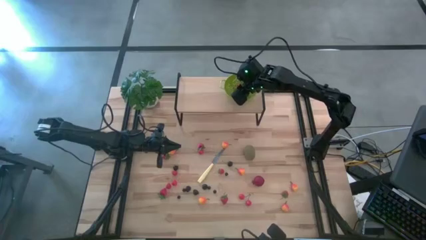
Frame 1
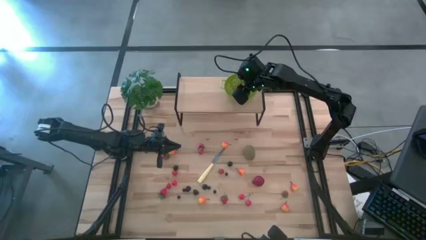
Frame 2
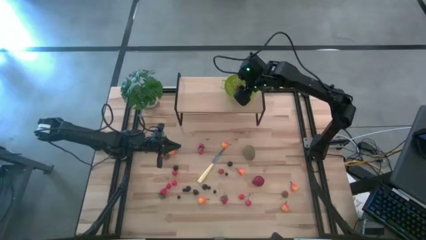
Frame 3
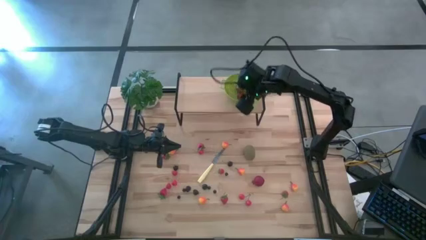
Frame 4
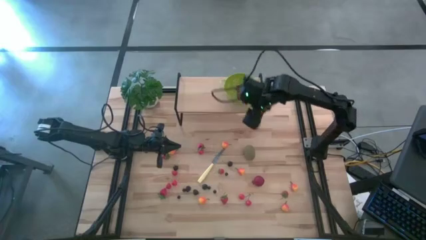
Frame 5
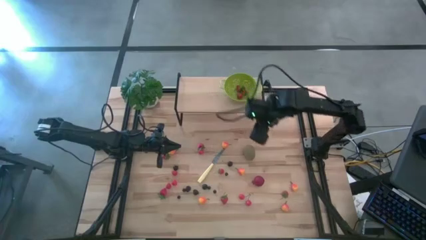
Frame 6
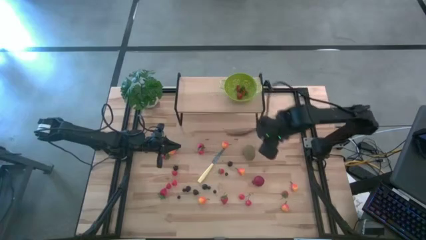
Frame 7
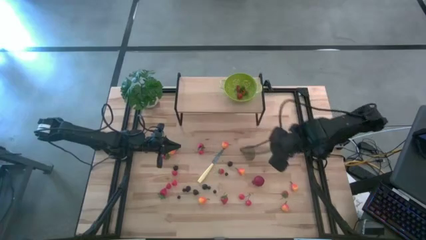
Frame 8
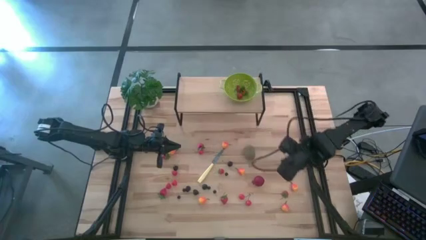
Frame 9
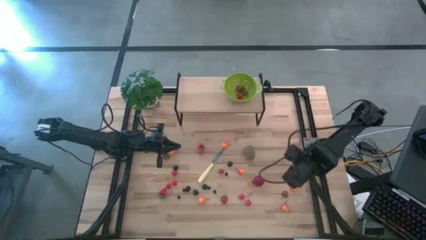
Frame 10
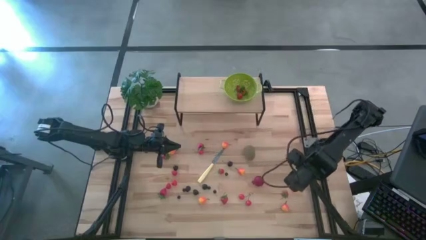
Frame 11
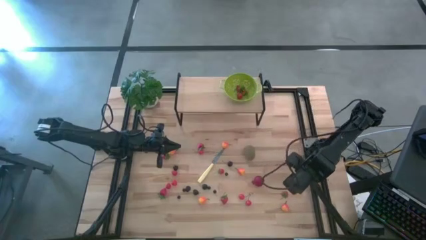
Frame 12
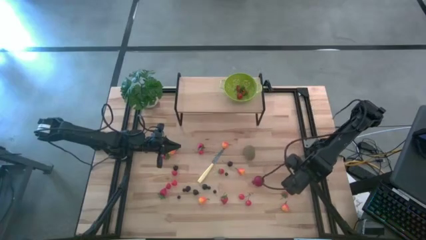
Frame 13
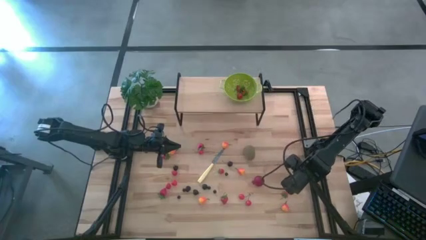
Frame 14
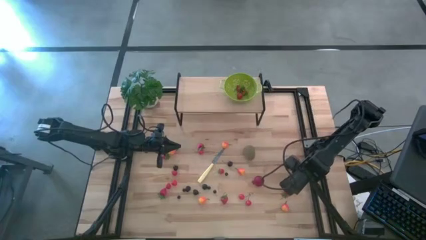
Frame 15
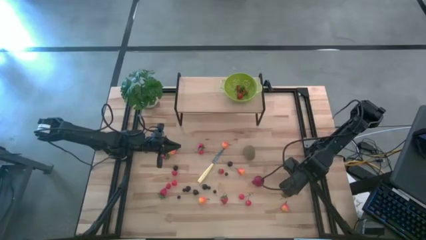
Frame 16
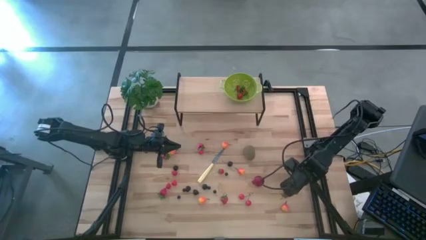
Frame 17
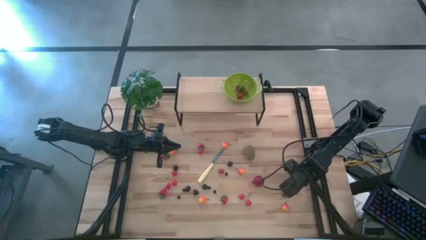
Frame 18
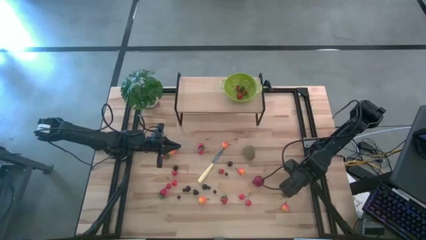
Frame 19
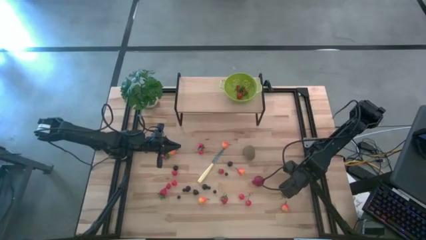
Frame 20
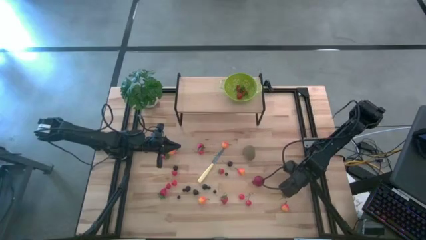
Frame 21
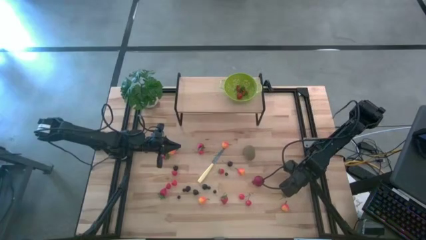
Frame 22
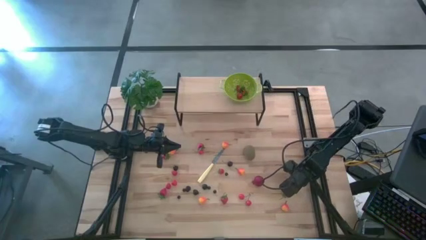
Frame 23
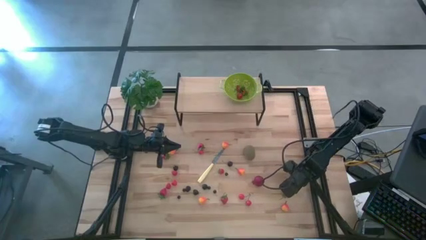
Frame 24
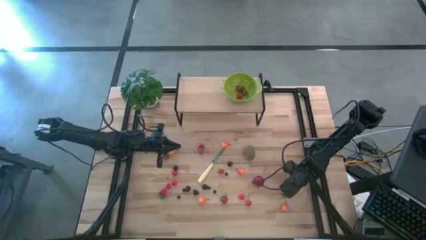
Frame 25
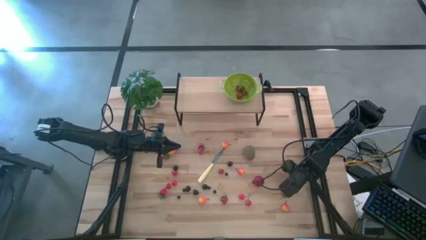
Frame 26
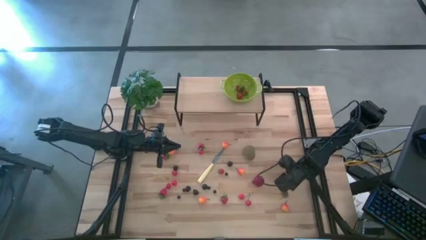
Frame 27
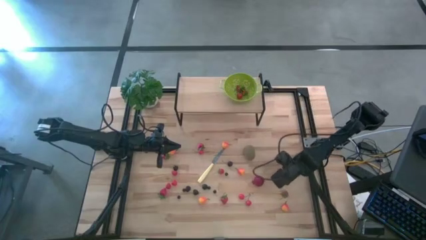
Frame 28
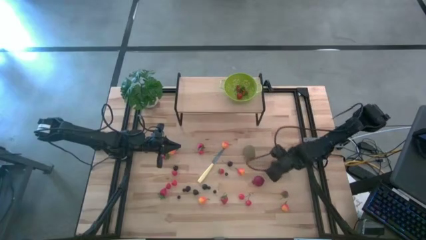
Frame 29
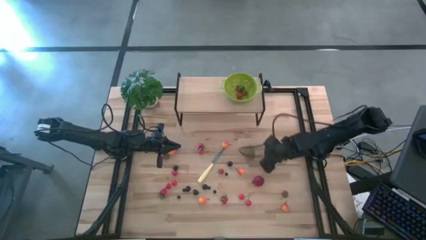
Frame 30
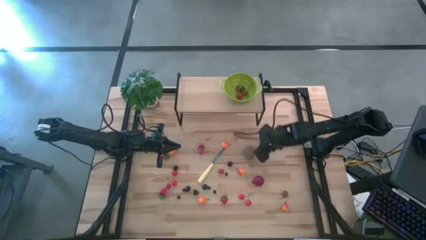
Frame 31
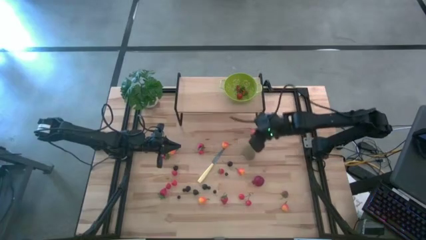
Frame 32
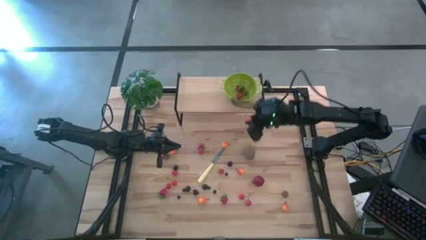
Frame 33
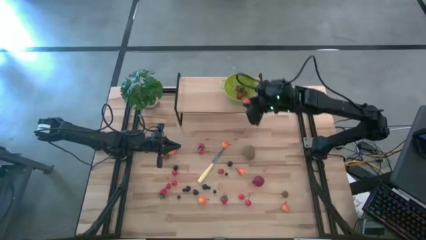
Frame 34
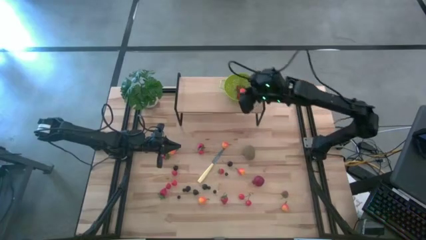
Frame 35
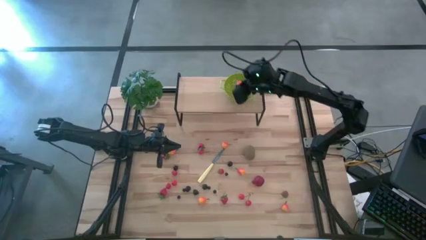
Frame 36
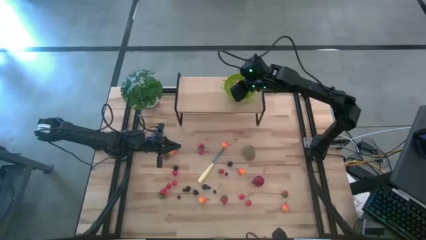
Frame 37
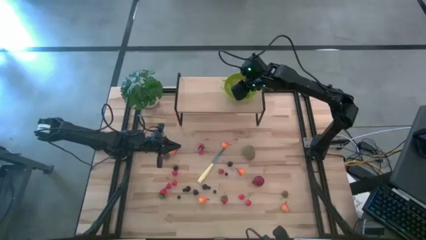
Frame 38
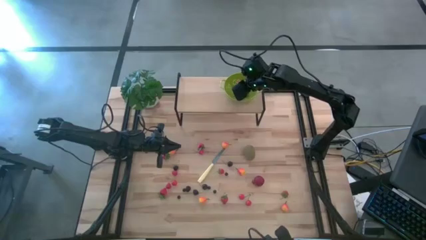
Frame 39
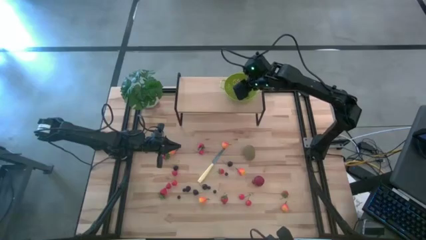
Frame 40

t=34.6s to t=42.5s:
Task: Pick & Place Fruit
Put the pear into the strainer bowl

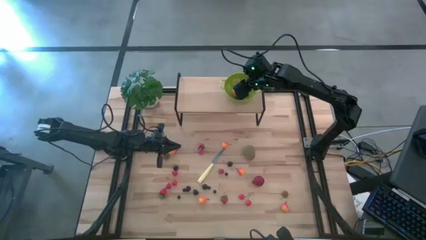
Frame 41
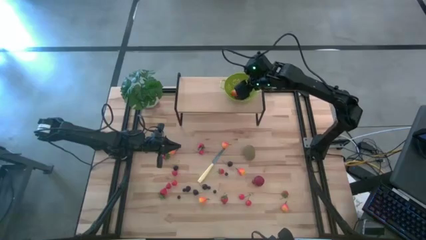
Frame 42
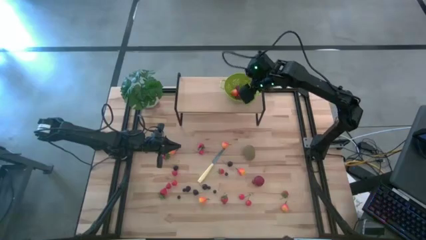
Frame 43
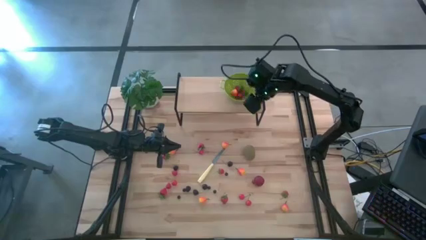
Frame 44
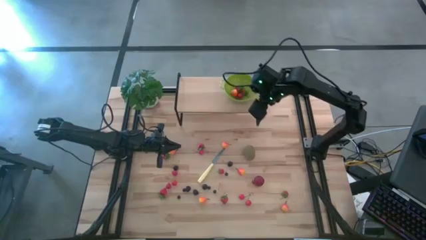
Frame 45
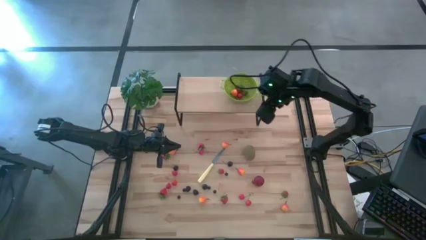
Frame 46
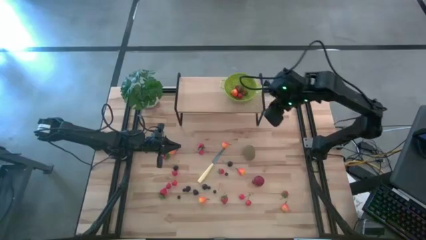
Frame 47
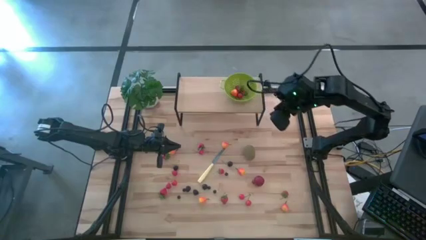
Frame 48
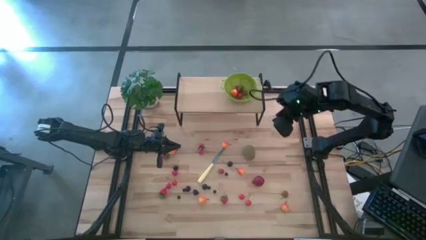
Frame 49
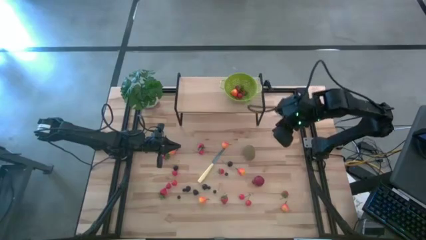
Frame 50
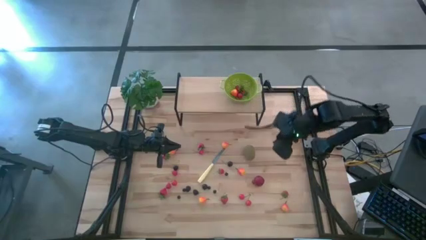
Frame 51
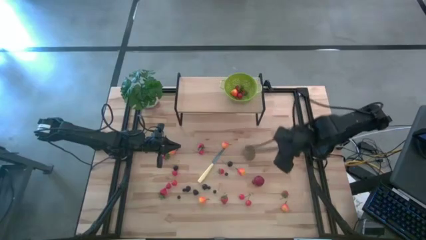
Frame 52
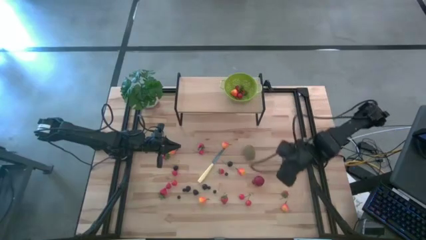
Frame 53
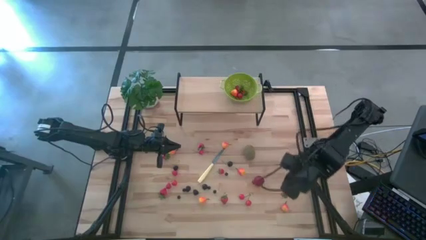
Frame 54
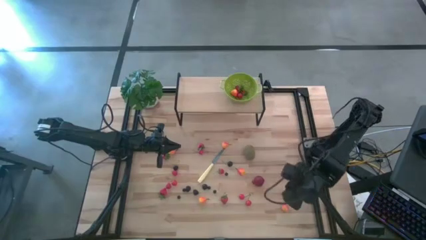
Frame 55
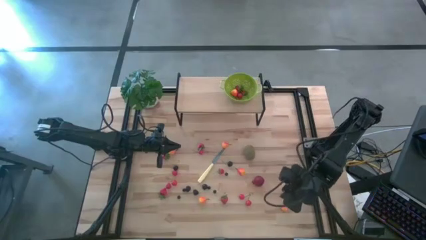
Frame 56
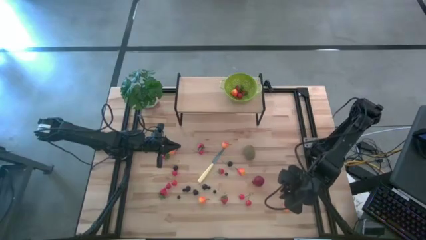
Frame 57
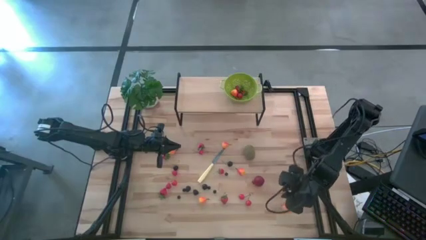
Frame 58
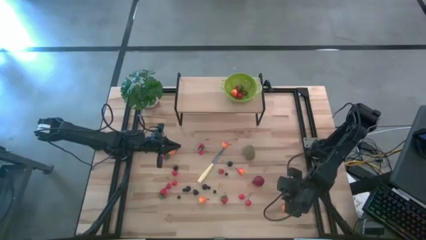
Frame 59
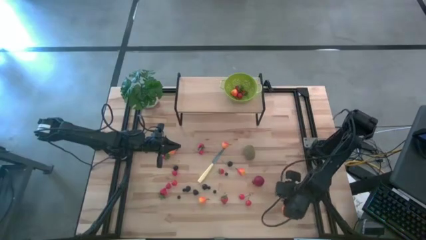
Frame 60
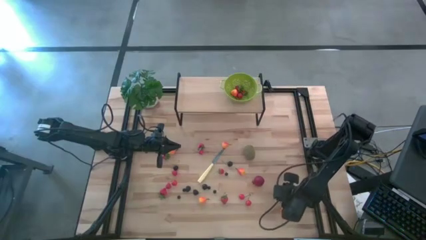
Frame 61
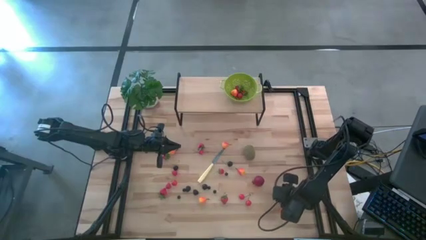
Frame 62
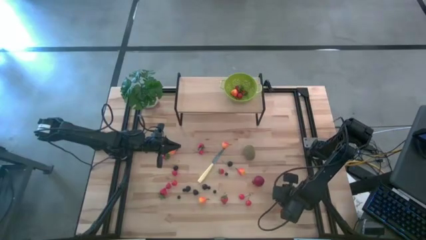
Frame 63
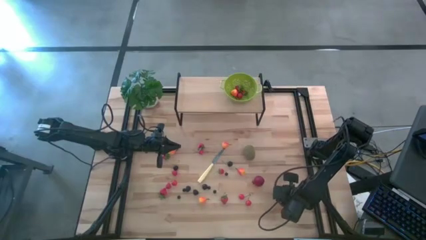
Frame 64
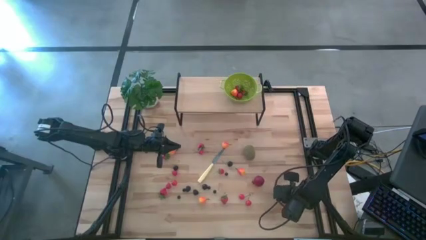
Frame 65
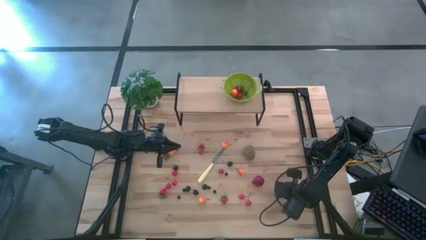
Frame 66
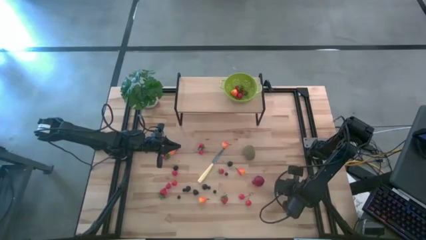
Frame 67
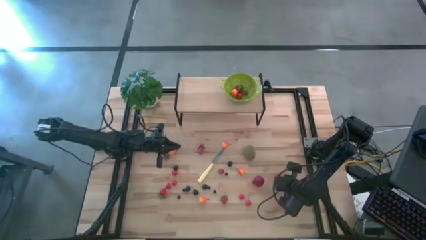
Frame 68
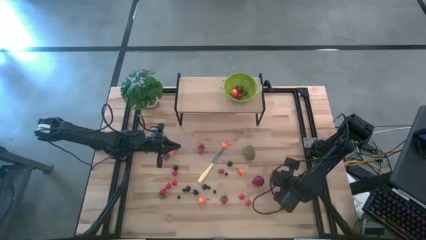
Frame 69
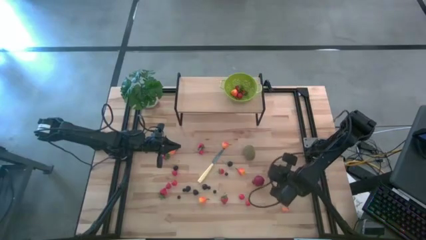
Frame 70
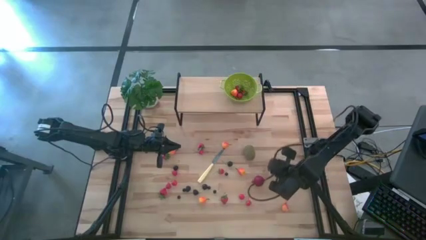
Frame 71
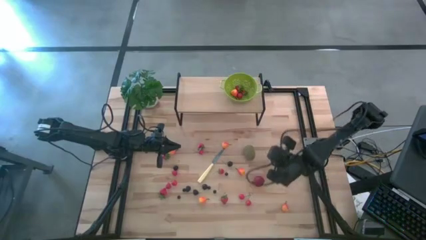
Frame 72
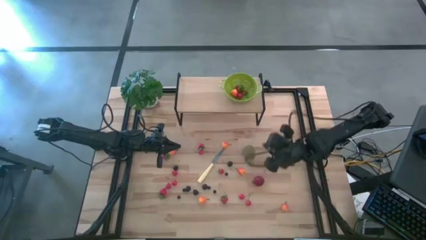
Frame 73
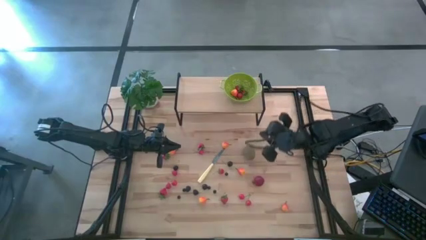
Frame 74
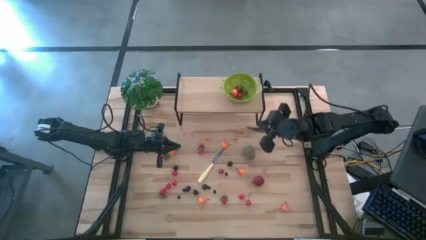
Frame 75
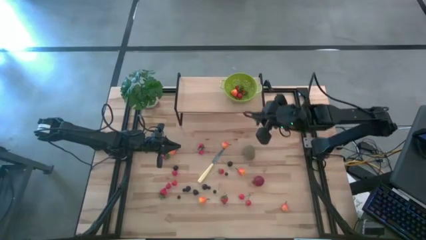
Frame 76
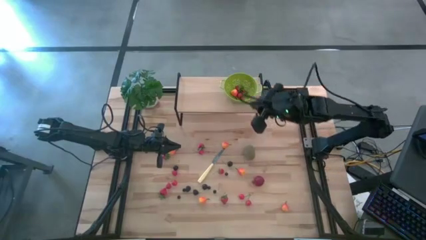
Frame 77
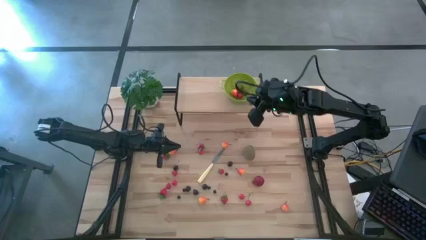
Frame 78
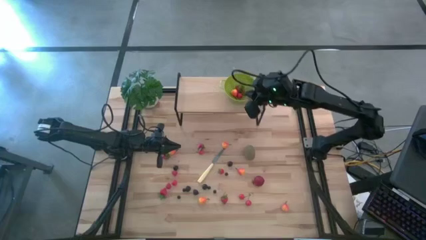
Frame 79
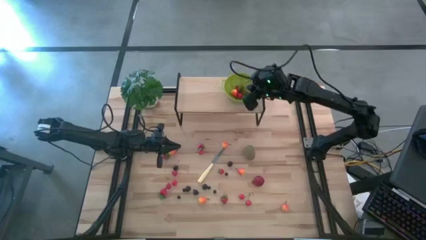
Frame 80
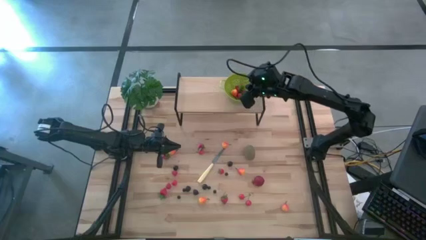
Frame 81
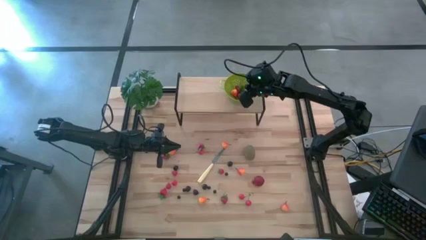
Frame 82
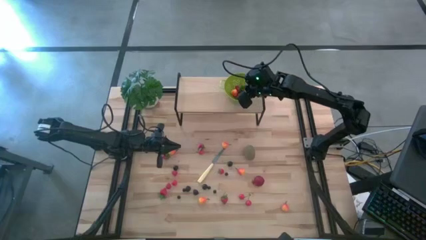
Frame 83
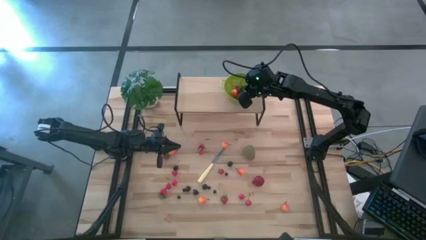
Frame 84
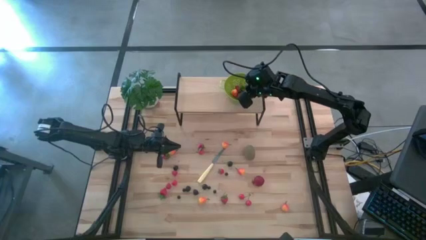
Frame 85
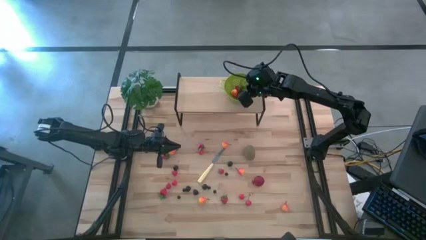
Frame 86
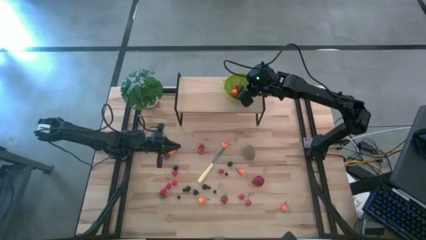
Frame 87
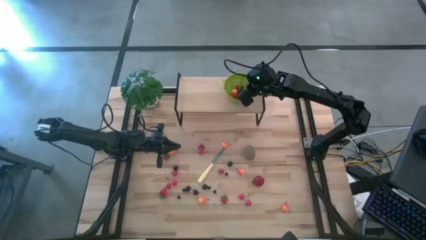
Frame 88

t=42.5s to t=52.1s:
Put the strawberry into the strainer bowl
